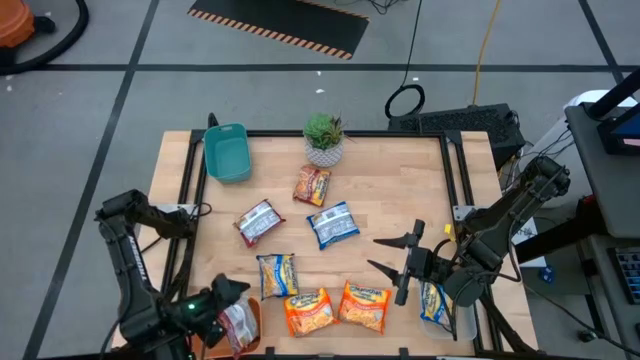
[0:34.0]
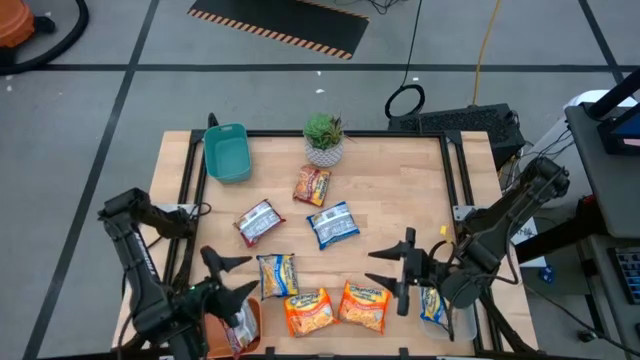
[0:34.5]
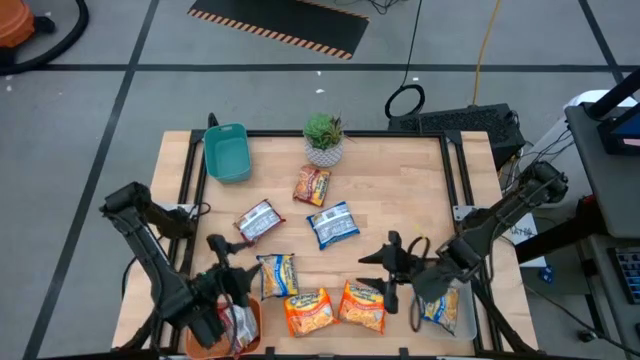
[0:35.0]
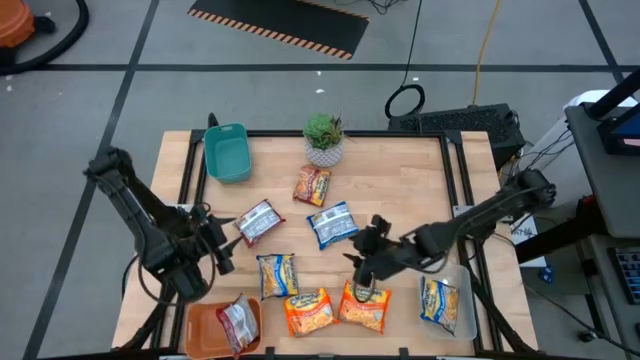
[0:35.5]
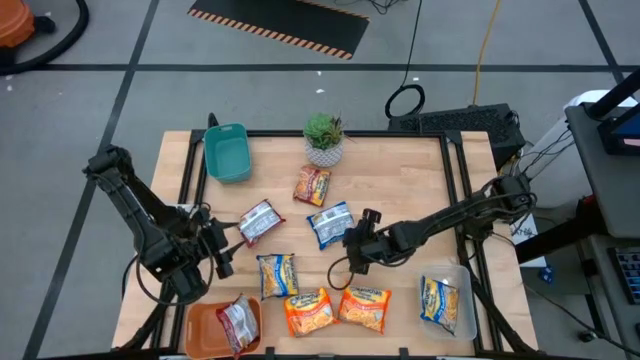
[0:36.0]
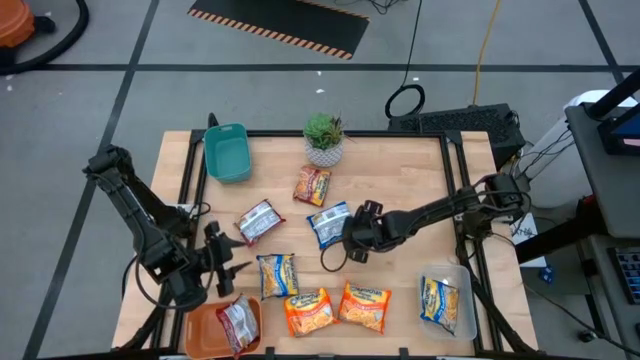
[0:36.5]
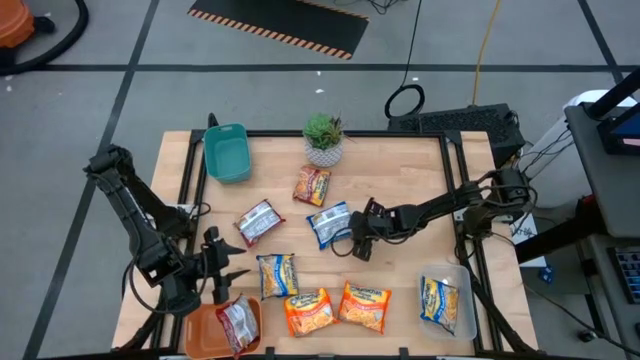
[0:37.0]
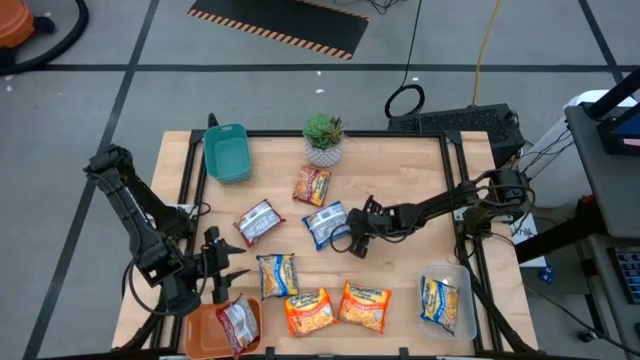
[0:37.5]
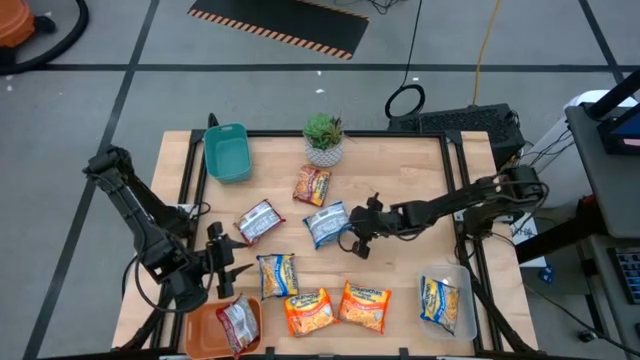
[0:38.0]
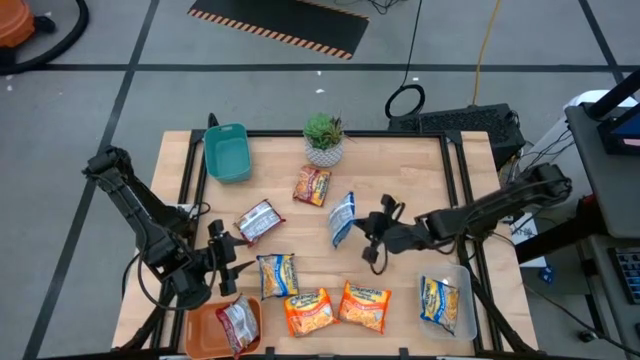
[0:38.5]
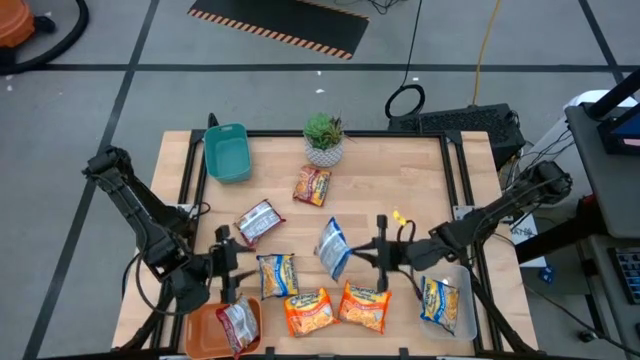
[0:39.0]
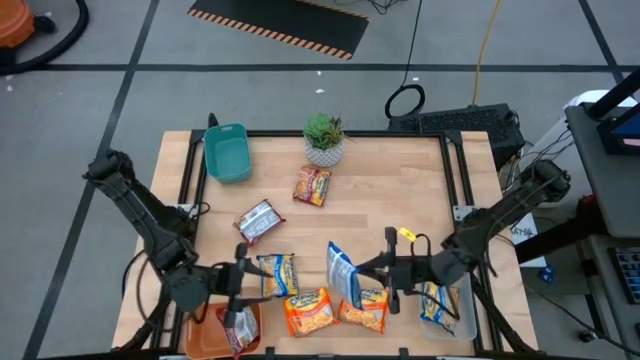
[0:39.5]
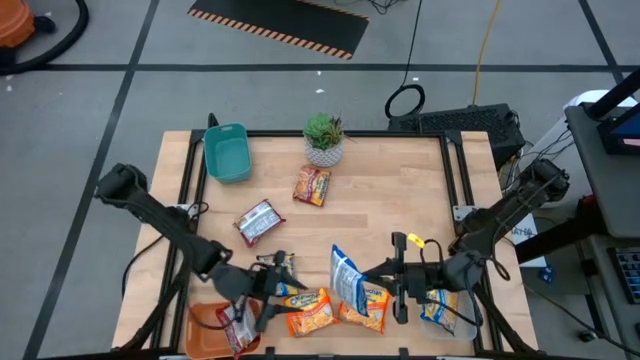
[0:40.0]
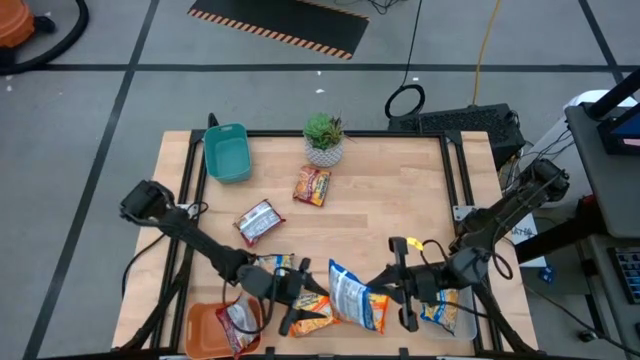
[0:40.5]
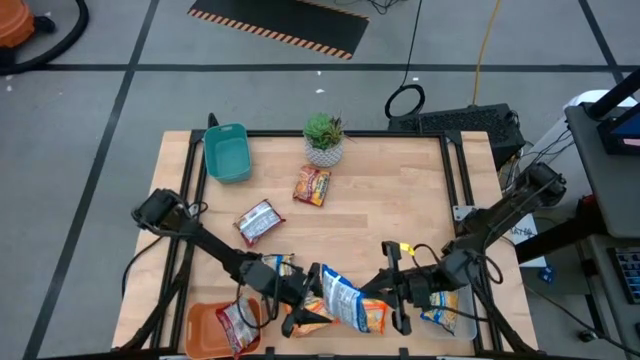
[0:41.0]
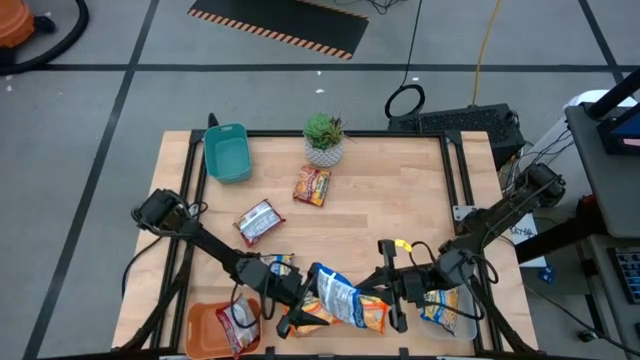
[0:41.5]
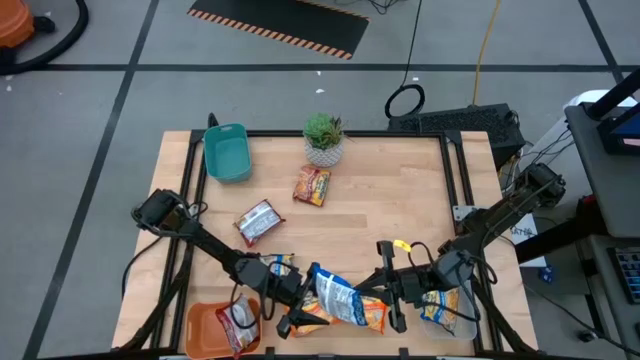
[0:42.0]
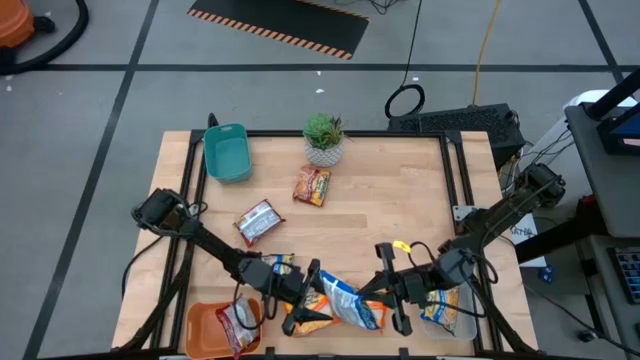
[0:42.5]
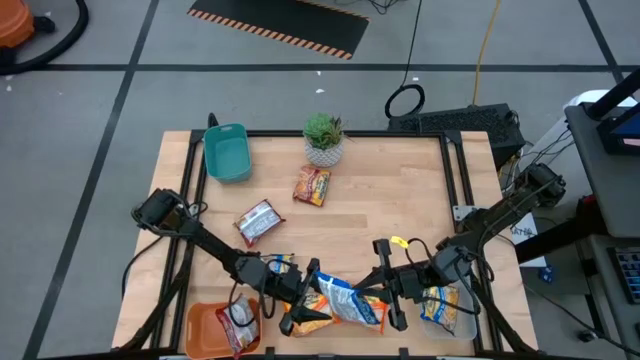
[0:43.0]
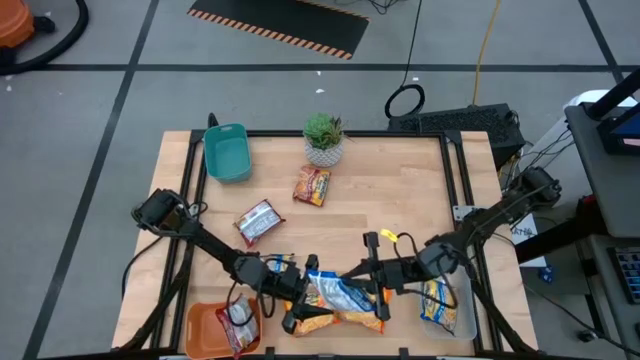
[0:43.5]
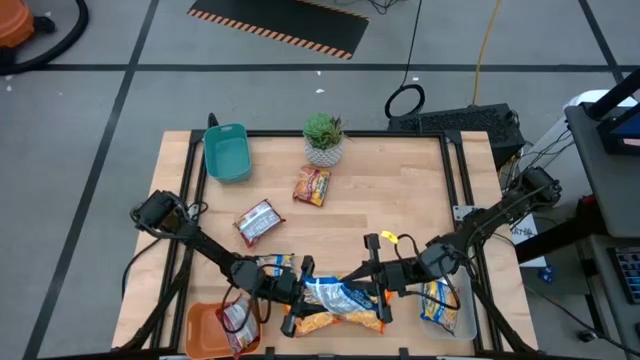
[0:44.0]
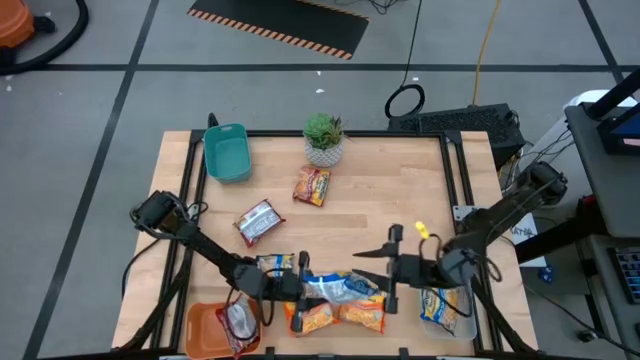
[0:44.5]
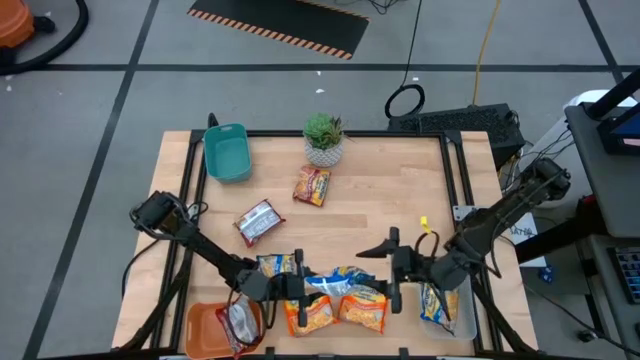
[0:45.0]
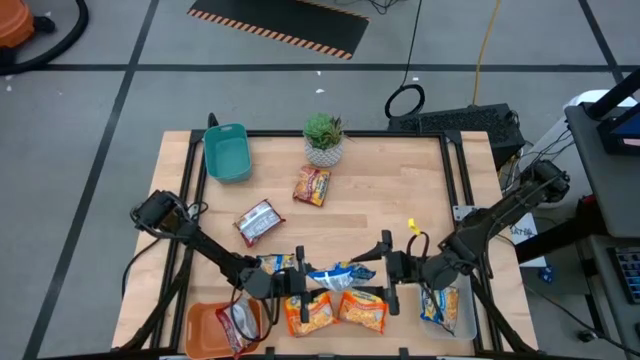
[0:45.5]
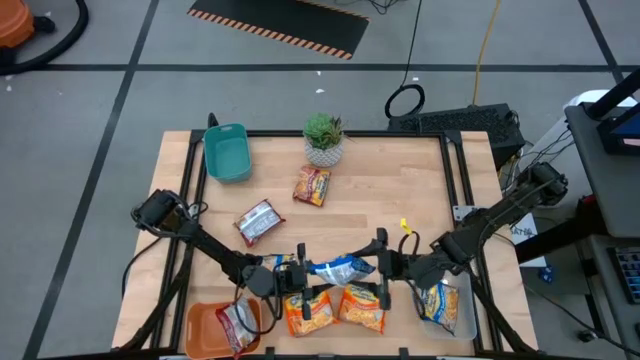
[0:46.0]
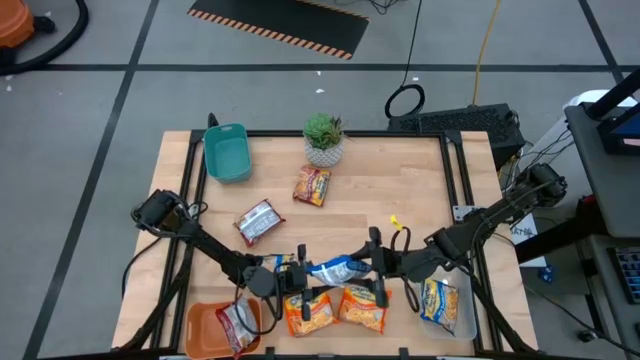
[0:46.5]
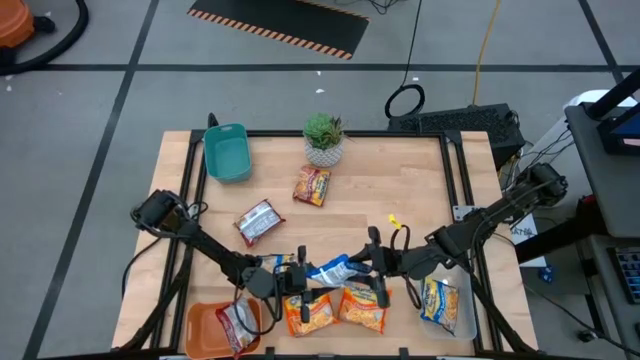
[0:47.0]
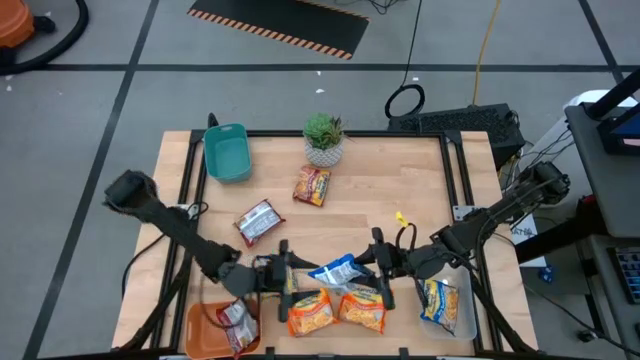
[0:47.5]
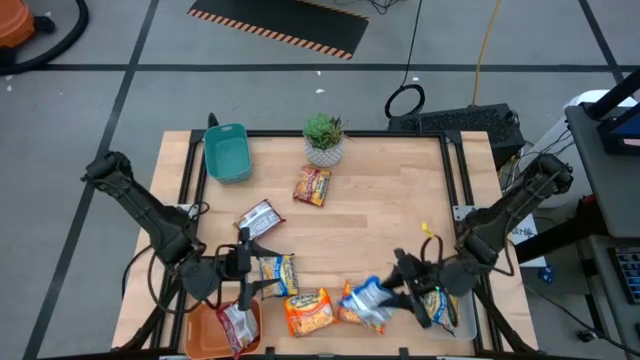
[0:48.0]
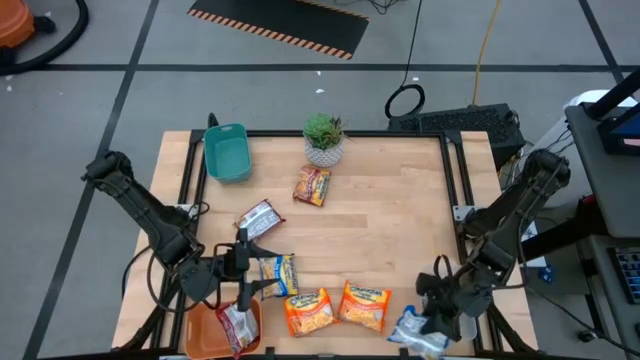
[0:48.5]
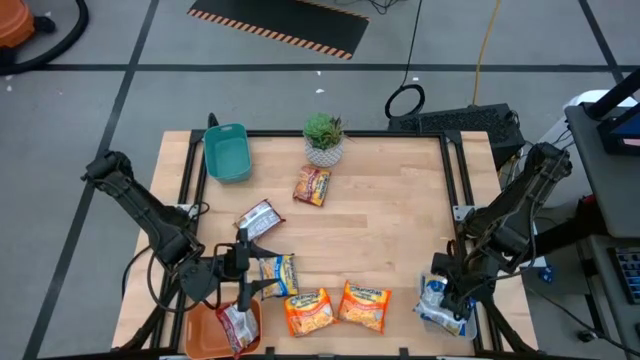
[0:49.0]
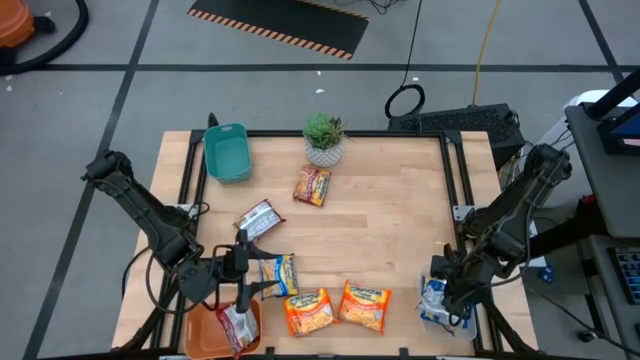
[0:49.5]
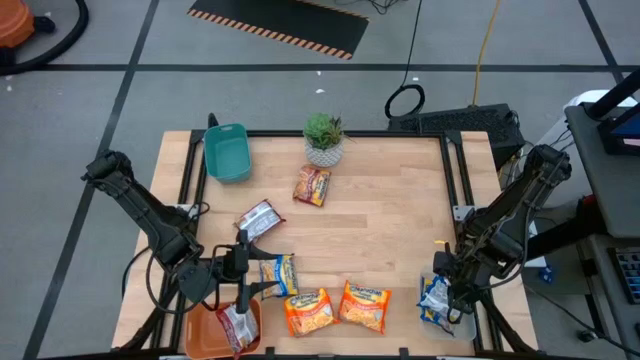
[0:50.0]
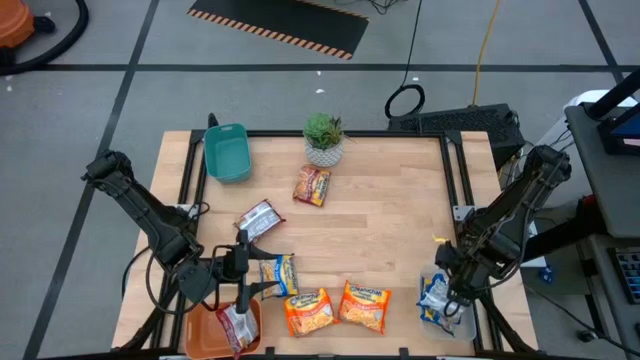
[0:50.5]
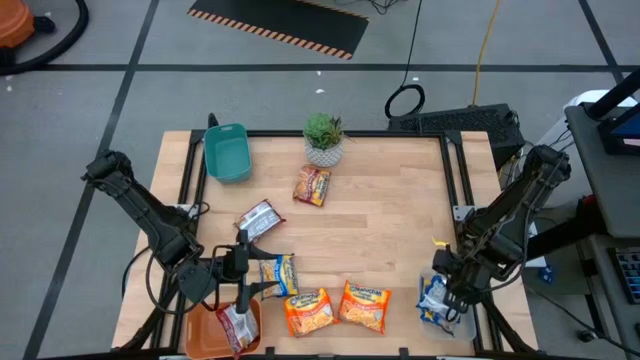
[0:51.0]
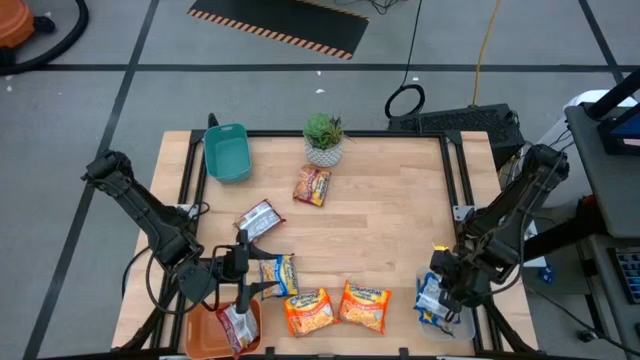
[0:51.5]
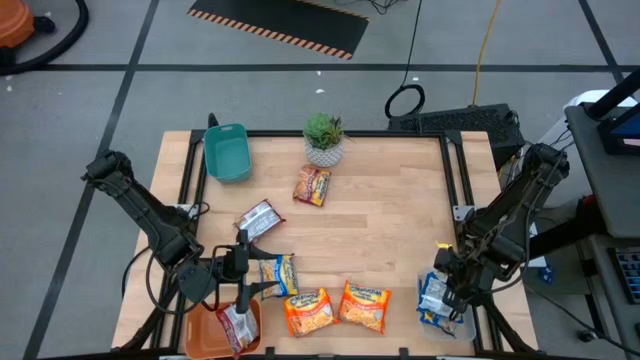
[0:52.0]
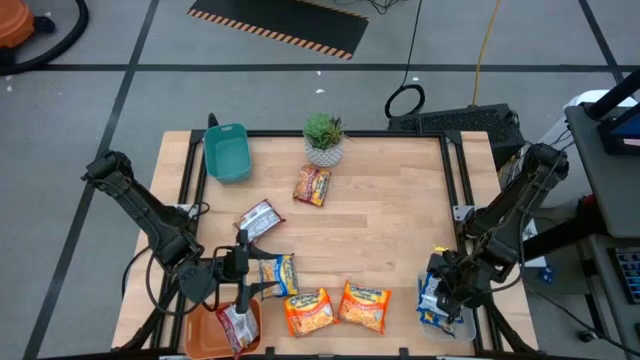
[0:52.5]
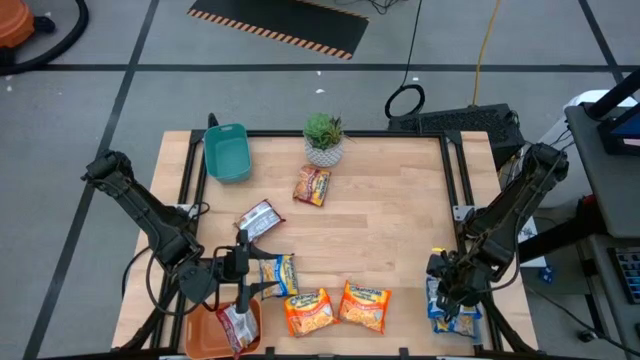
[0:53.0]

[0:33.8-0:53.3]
Task: Sort Maruchan noodles
Put the top blue noodle pack into the transparent bin

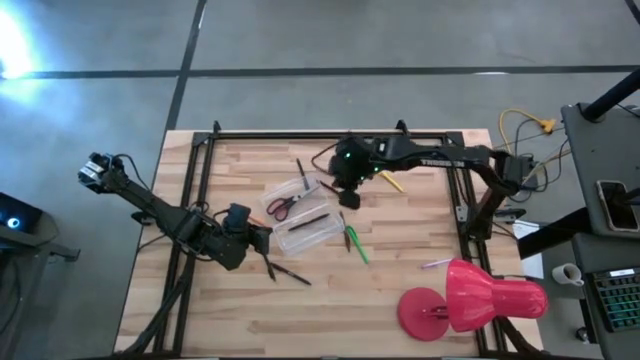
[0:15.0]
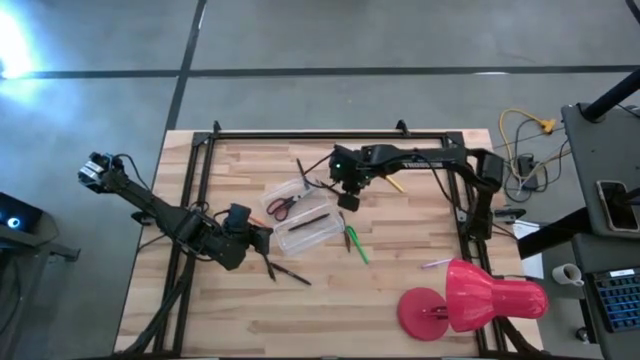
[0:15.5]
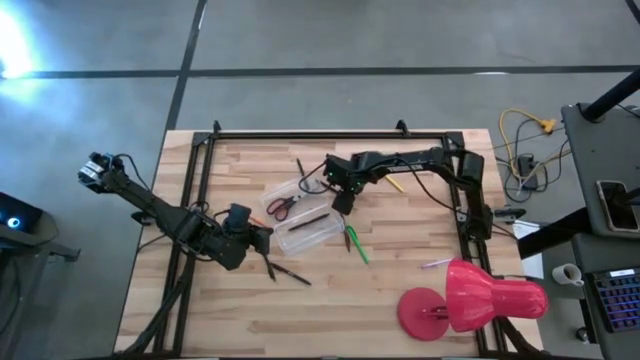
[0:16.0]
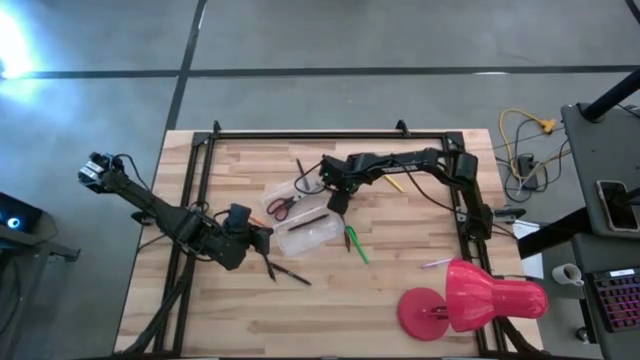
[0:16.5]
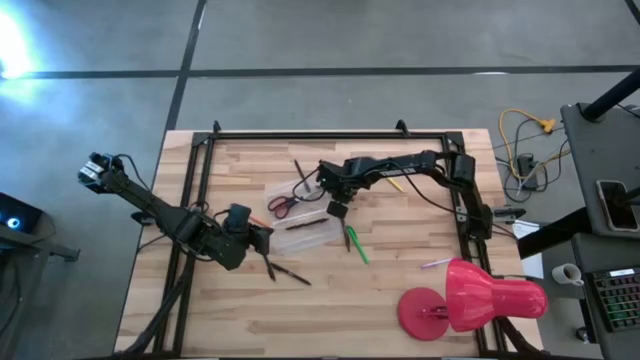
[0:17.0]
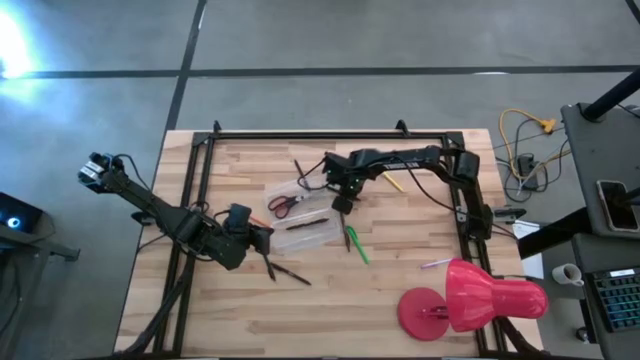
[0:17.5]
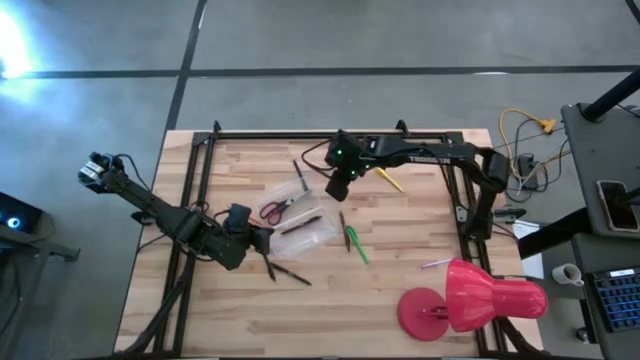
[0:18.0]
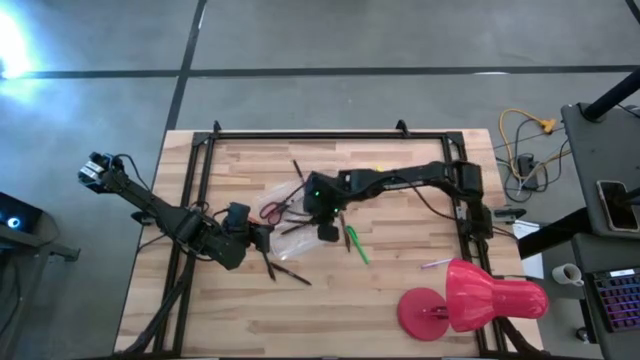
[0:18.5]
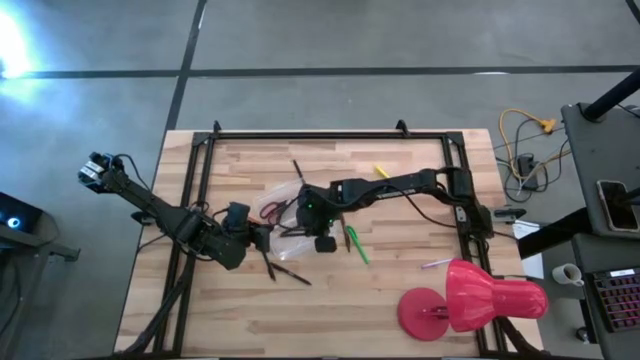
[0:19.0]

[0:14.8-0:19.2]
Task: Pick & place school supplies into a supply box
Put the black pen into the stationery box
